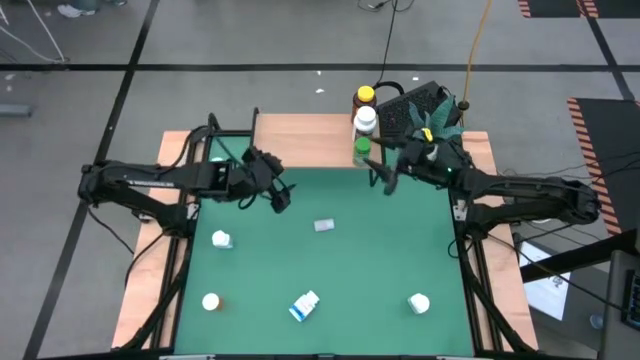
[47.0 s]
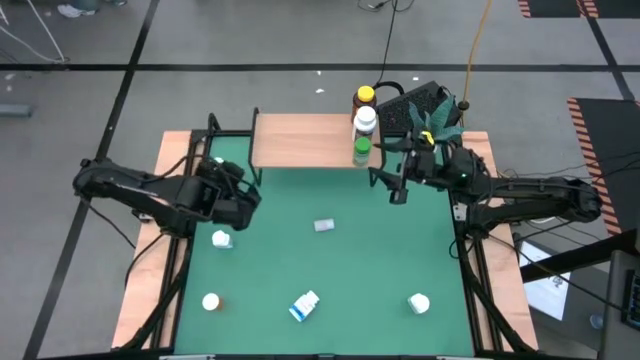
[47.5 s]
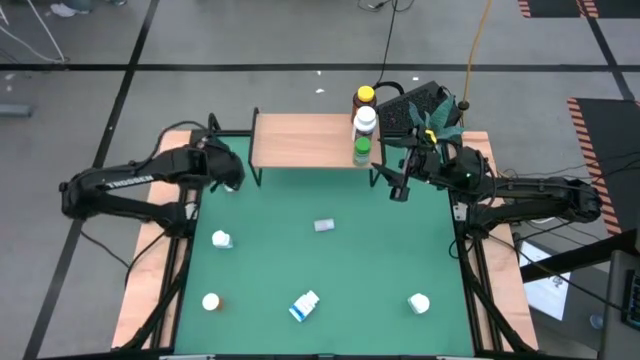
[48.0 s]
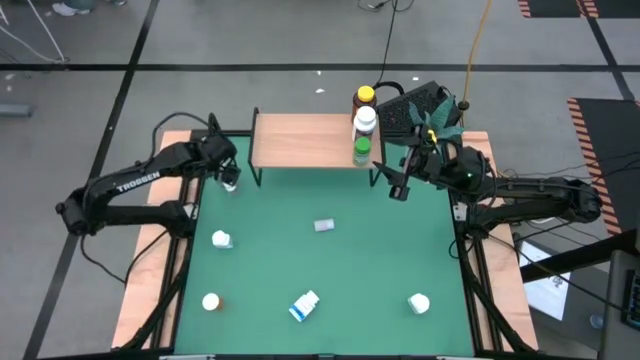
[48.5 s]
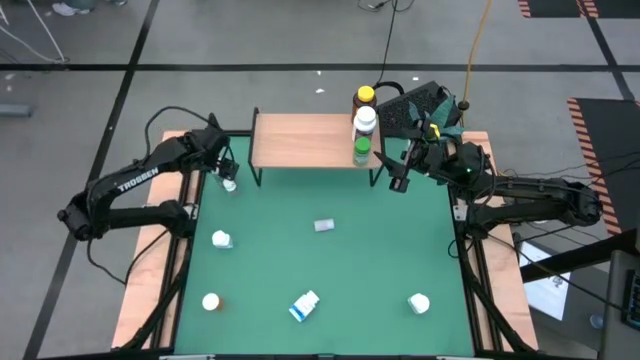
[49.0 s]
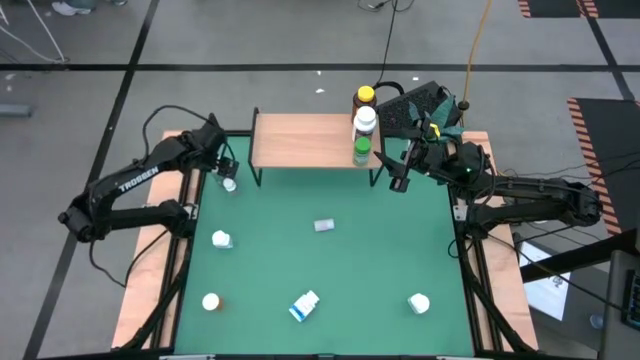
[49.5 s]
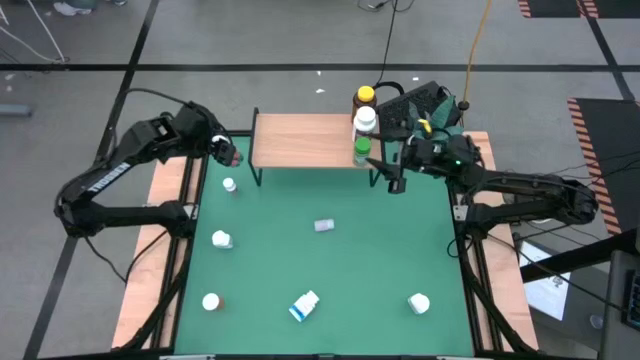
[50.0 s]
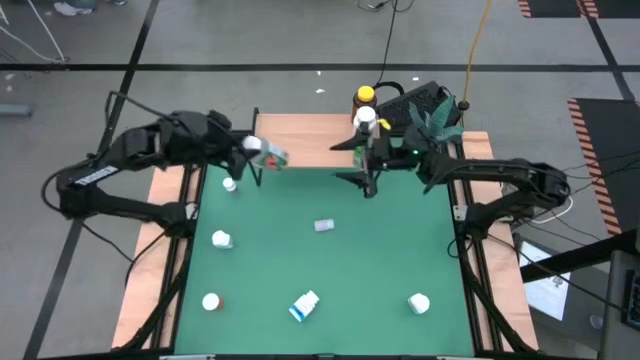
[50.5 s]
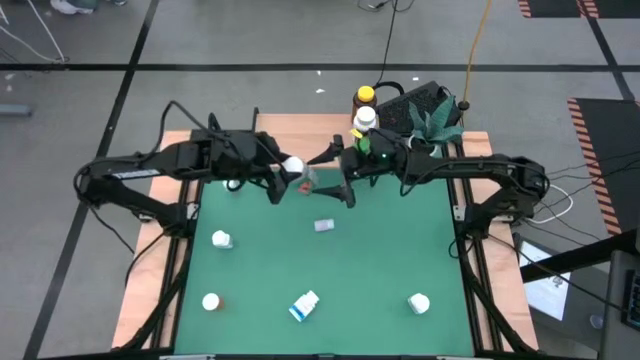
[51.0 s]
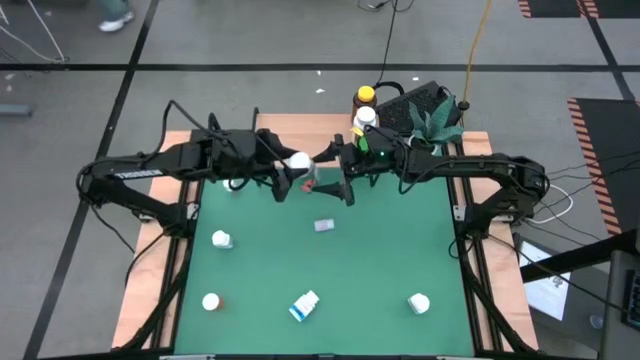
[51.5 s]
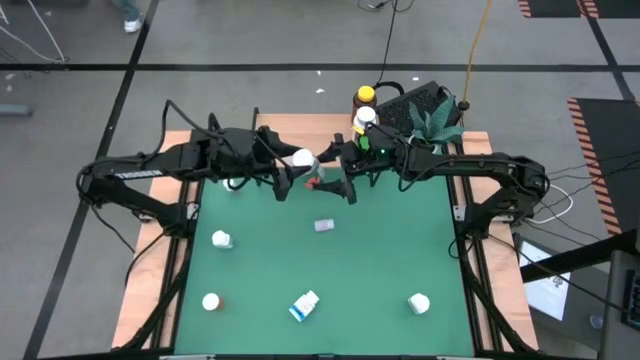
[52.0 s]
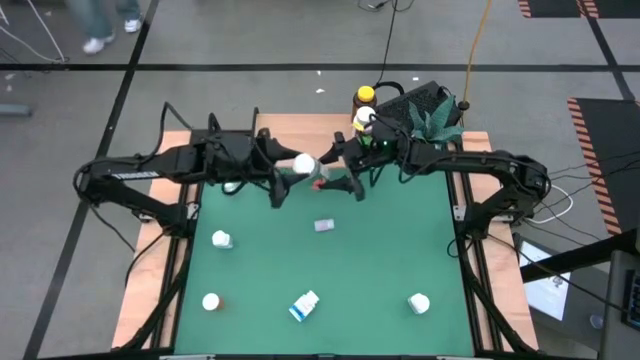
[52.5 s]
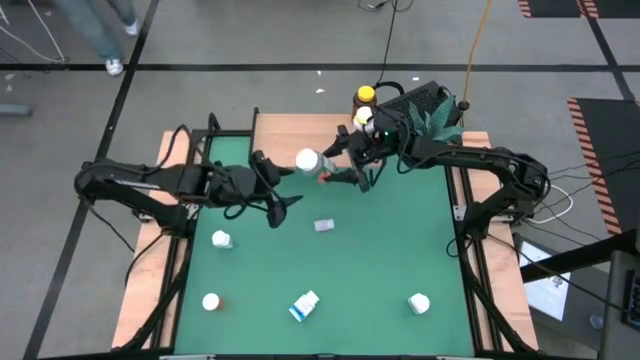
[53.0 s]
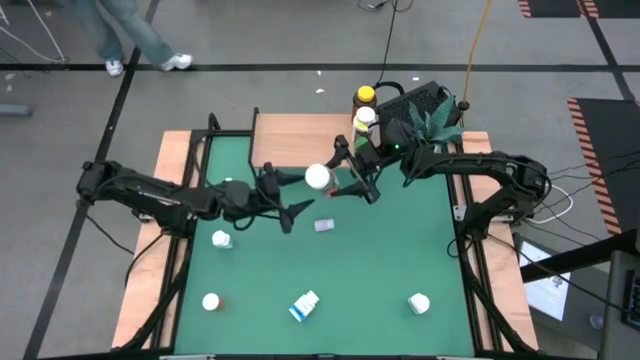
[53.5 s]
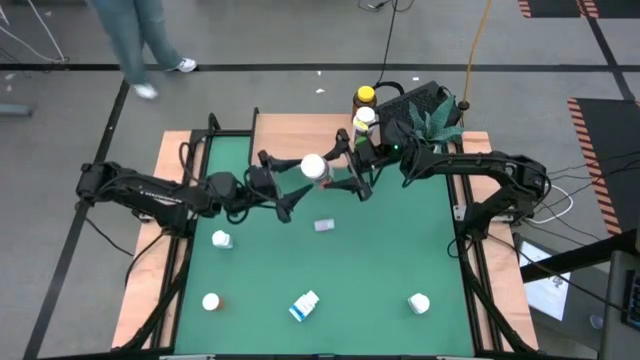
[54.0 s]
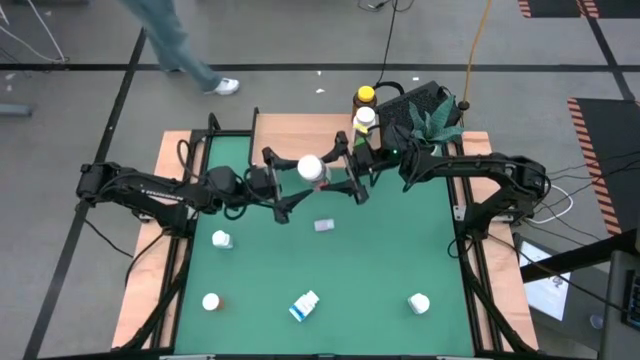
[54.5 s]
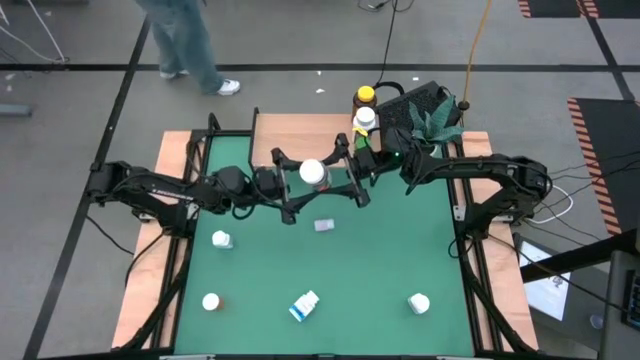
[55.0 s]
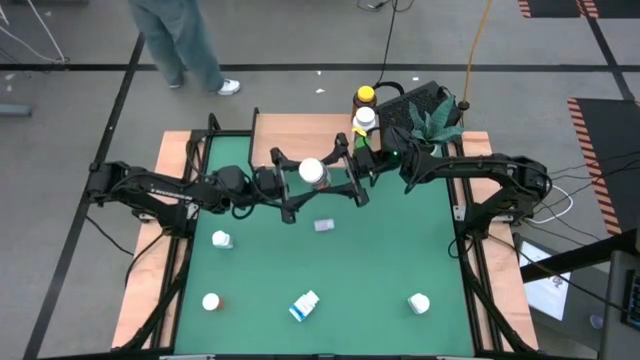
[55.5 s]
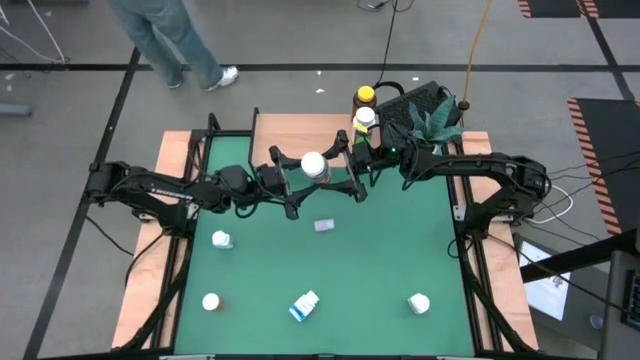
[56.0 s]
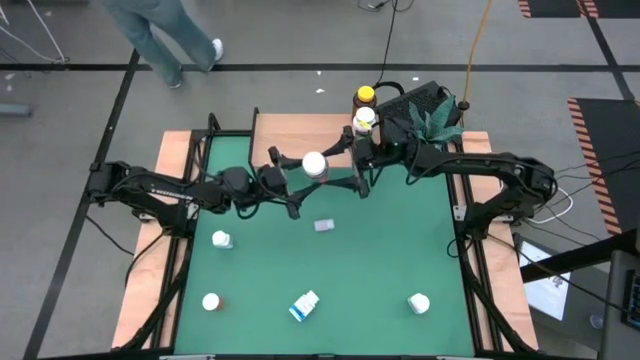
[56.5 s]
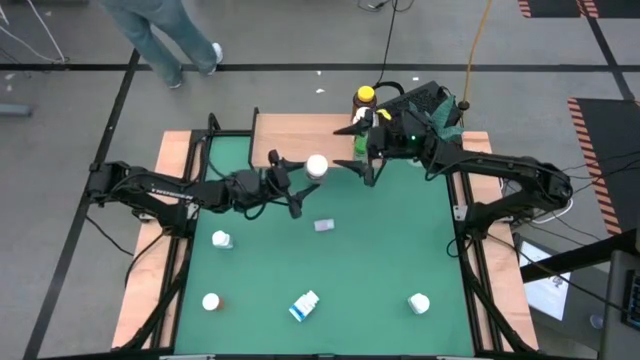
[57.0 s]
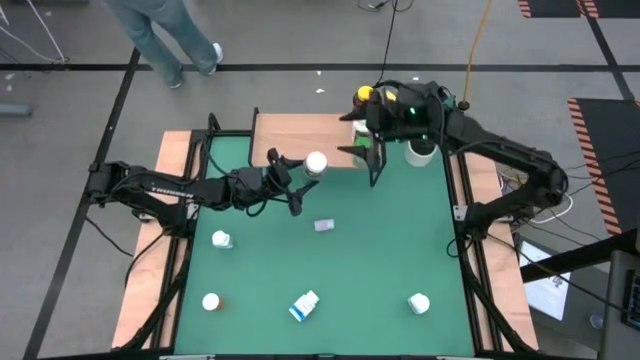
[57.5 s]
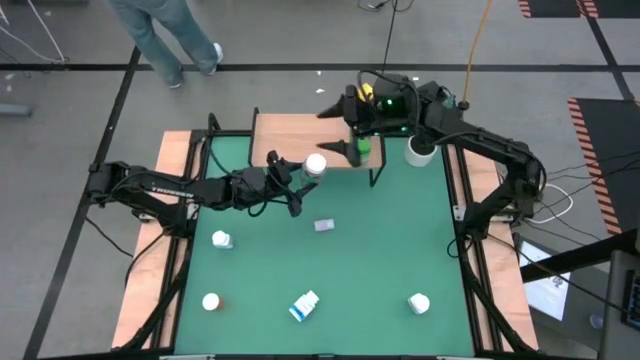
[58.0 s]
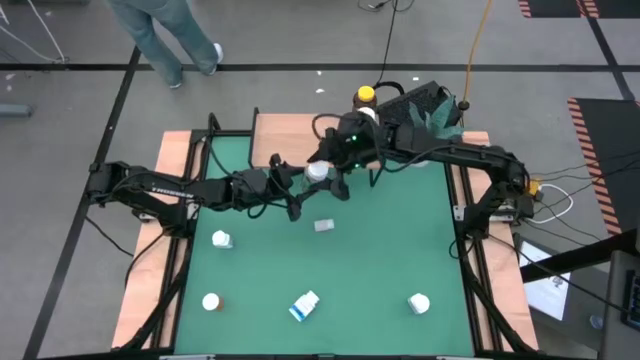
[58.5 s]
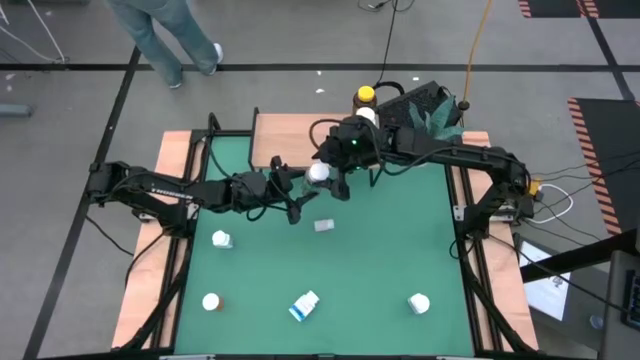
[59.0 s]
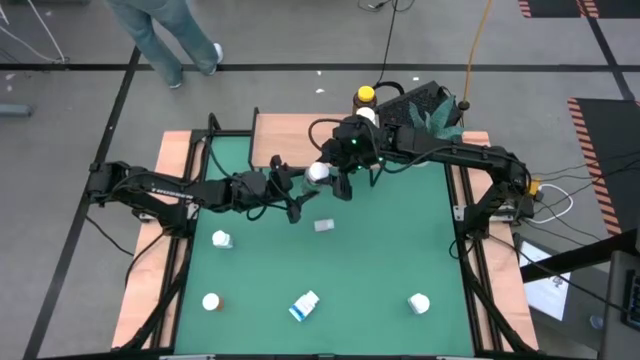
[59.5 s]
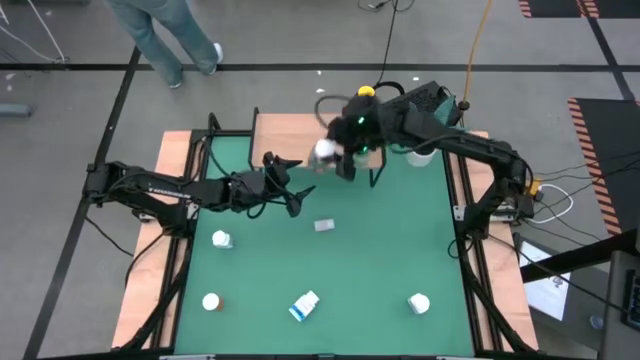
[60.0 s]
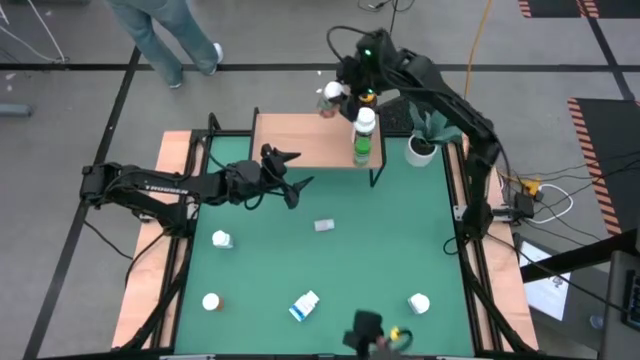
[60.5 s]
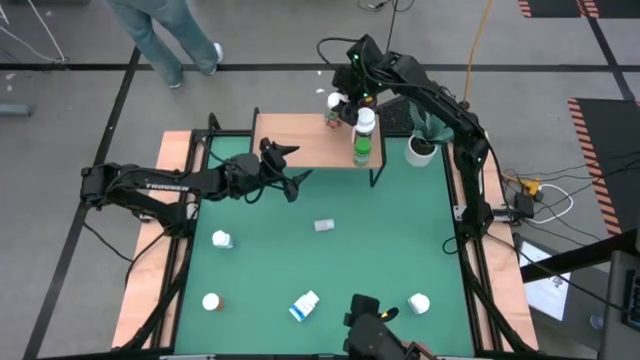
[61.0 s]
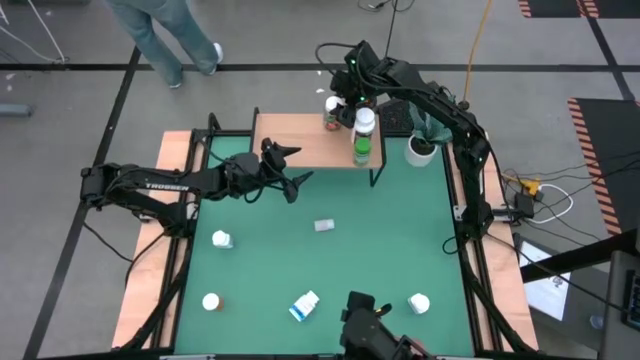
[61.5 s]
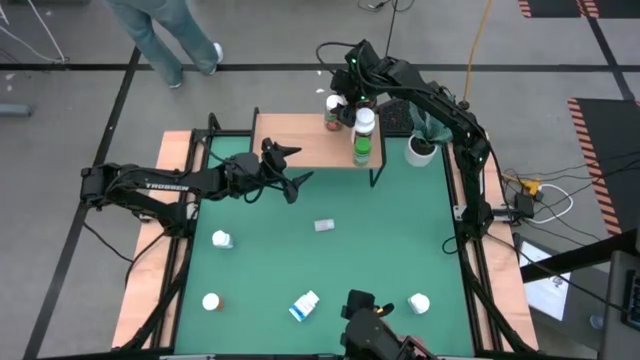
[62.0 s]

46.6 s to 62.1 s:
Task: Pick and place medicine bottles onto shelf by color
Put the large green pill bottle on the shelf

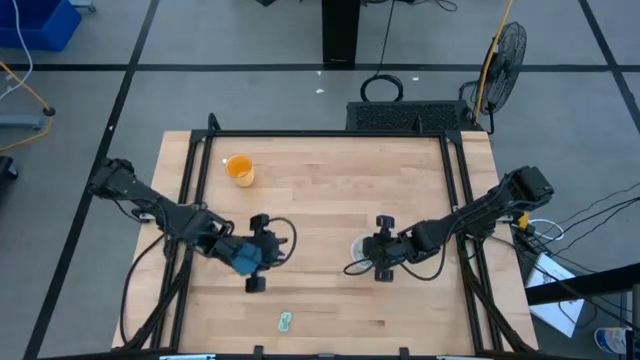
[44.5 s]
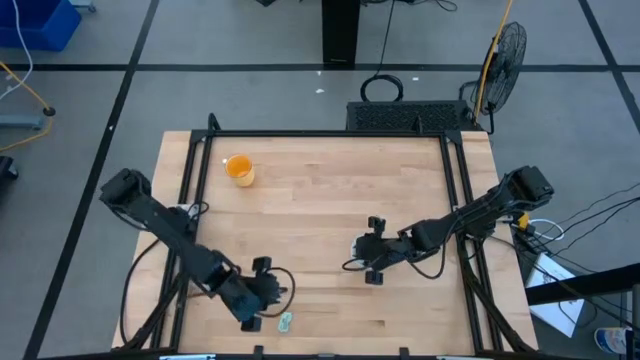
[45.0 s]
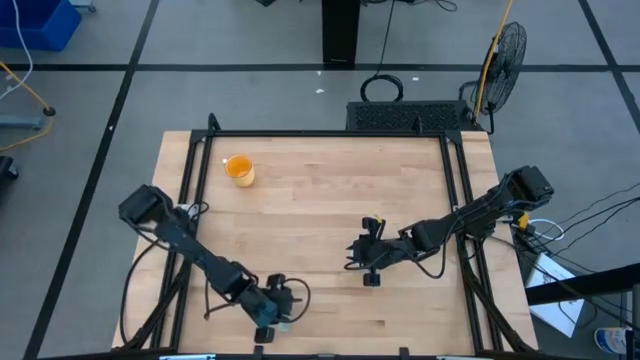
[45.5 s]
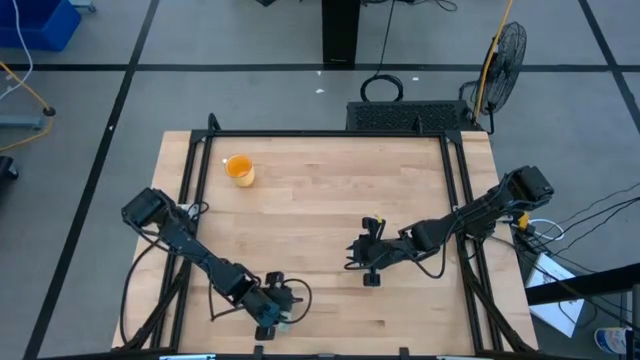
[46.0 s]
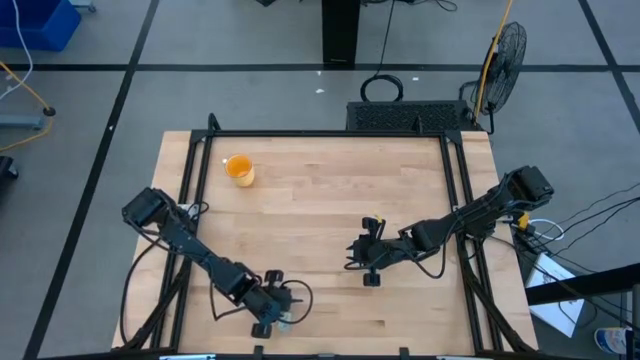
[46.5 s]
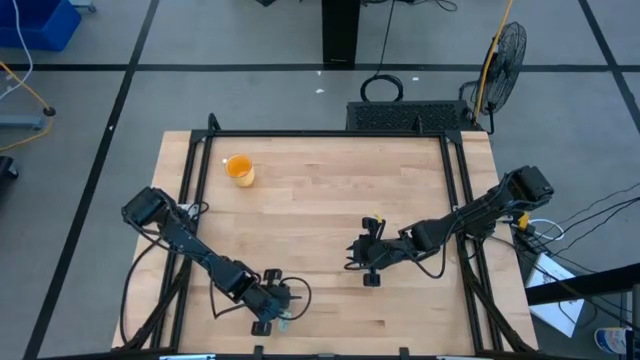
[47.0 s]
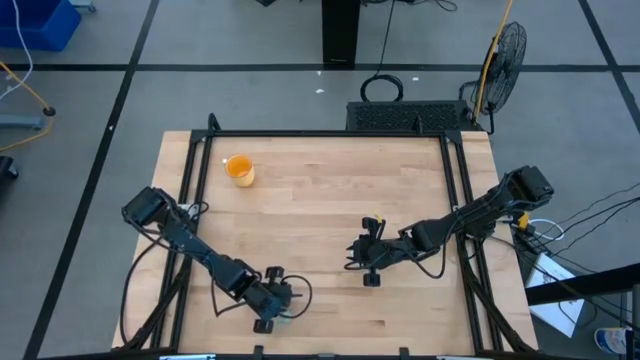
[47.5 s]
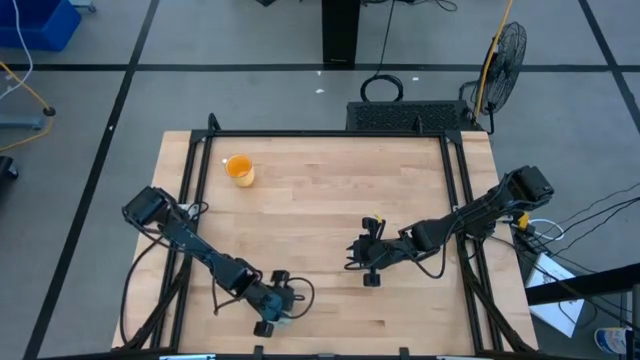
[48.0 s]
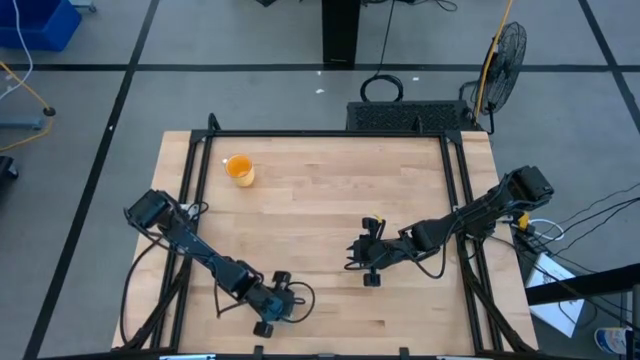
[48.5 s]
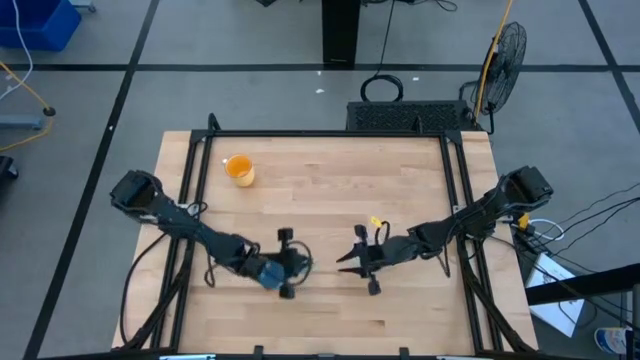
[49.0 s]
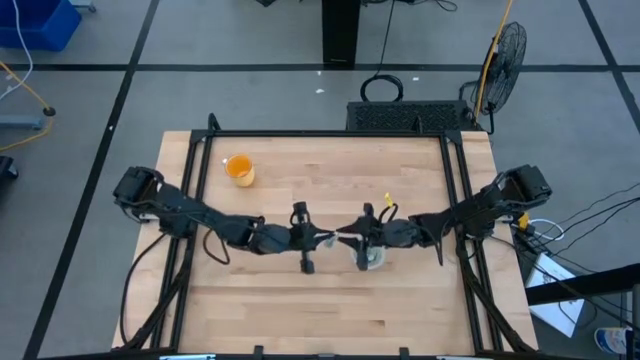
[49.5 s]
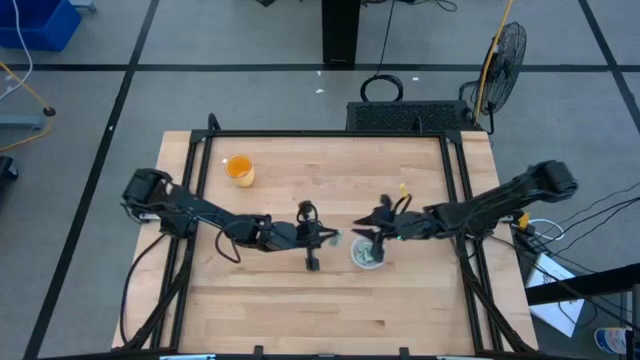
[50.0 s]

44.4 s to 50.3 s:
Task: Pick and place Stevia / Truvia into bins
Put the stevia packet into the transparent container
